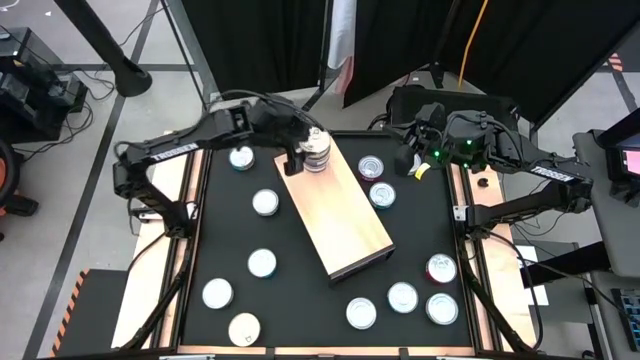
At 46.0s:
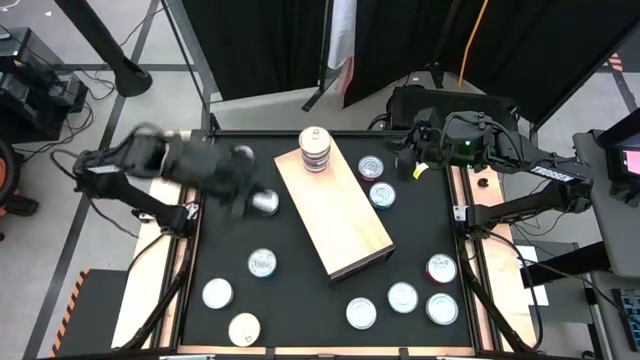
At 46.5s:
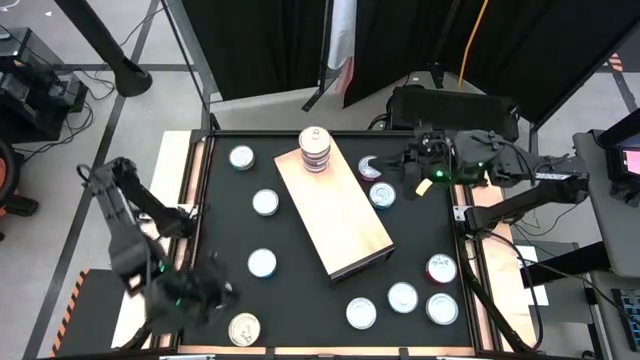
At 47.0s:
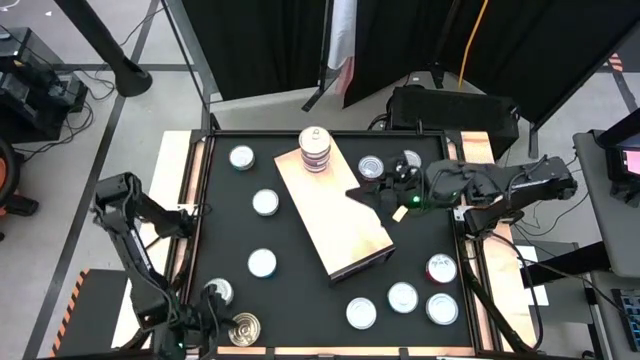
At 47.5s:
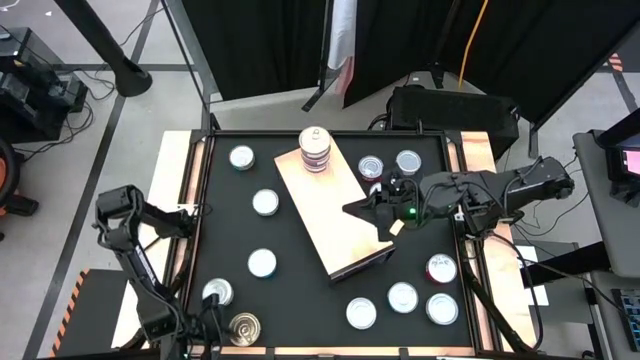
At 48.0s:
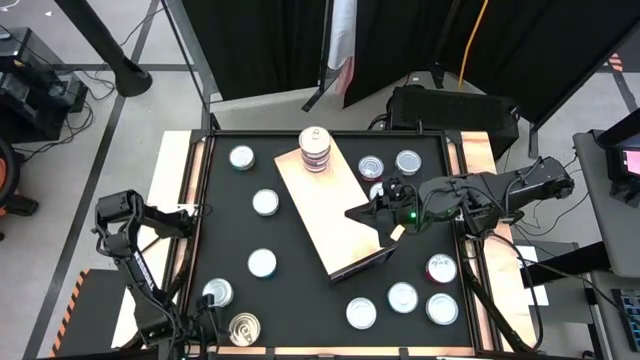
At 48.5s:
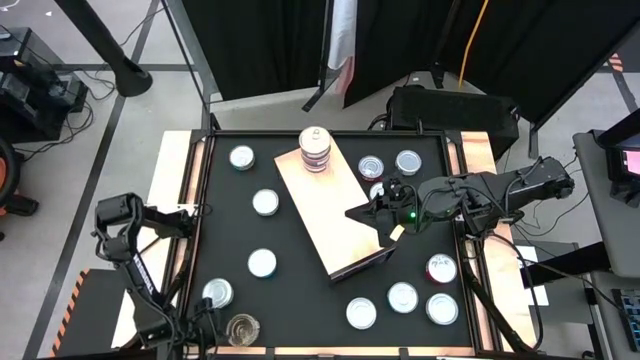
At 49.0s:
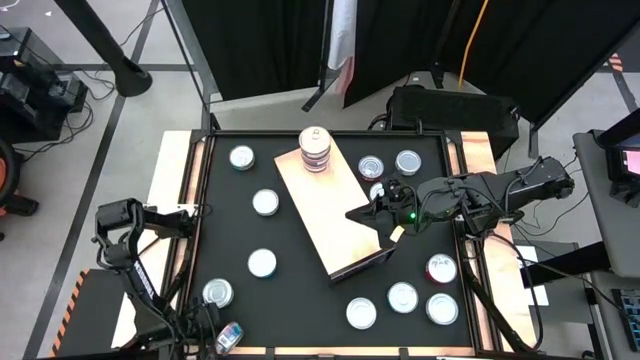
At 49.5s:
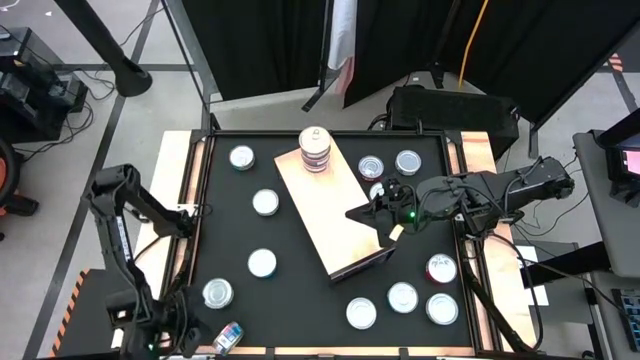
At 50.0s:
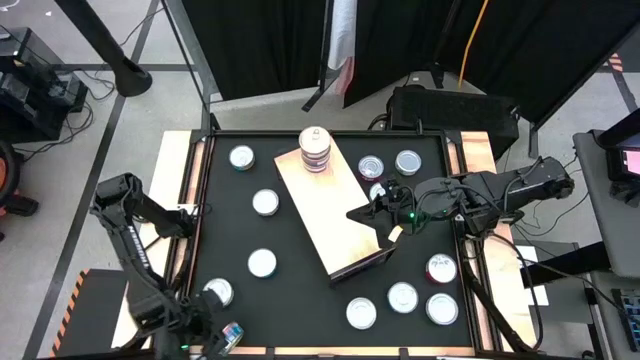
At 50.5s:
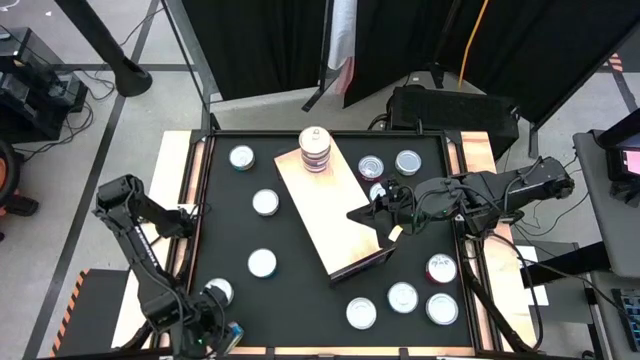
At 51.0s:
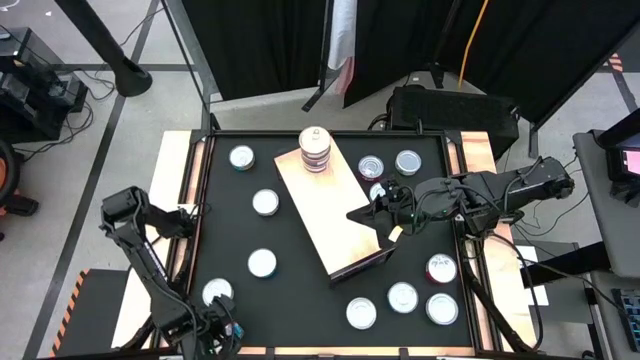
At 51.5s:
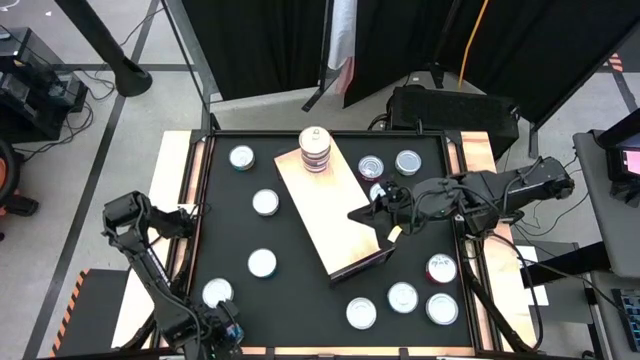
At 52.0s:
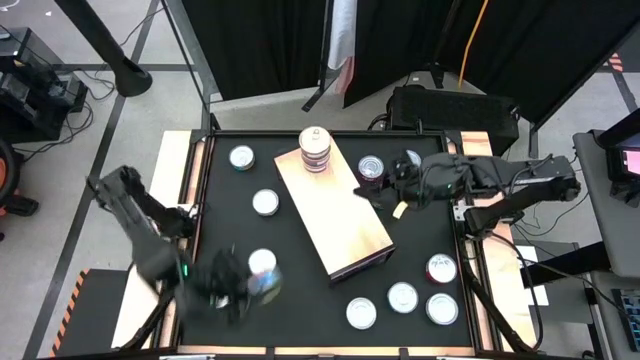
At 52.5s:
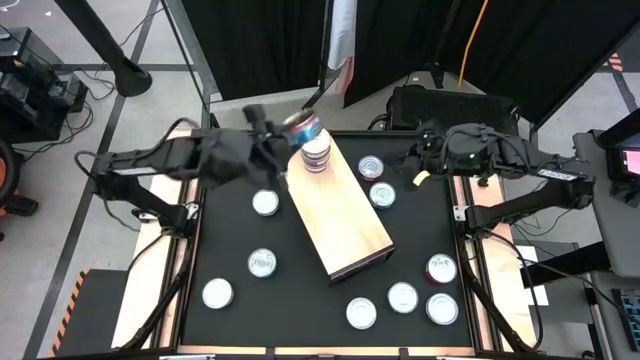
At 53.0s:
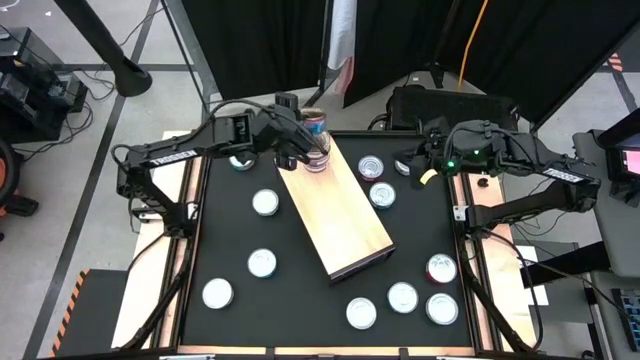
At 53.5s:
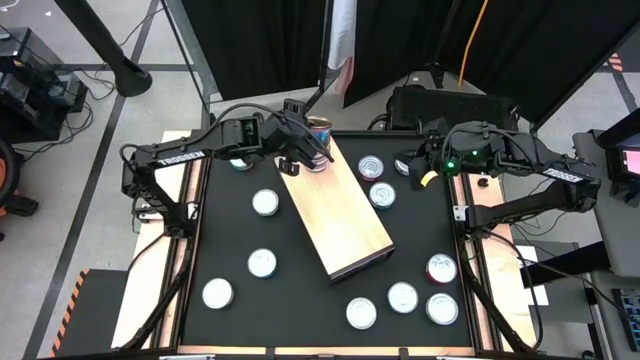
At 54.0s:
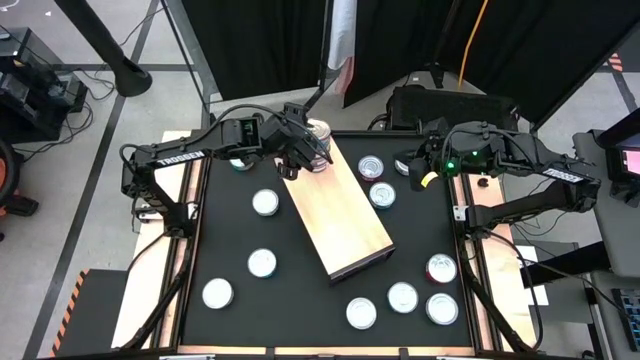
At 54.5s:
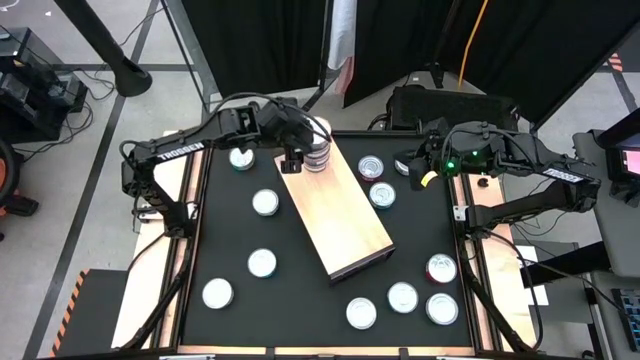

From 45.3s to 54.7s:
Task: Stack canned seafood by type on shelf
Stack the blue-pink tuna can on top of the stacked blue-pink tuna can on the shelf

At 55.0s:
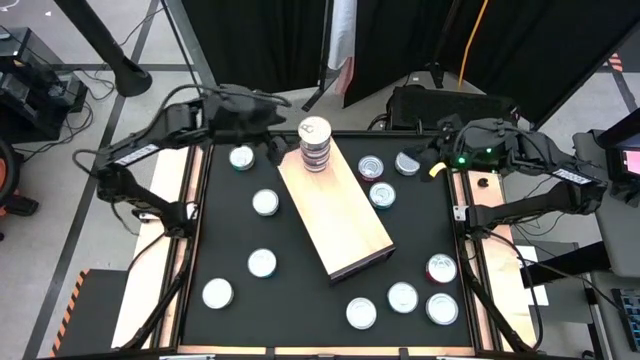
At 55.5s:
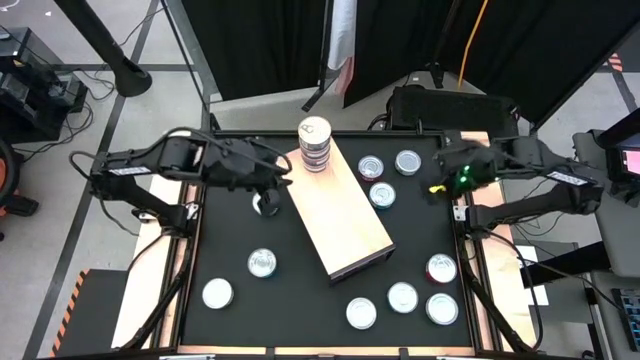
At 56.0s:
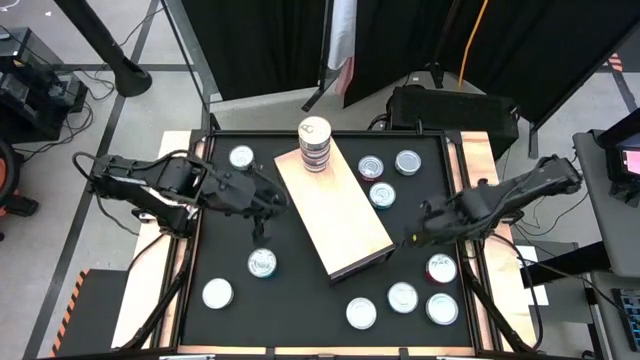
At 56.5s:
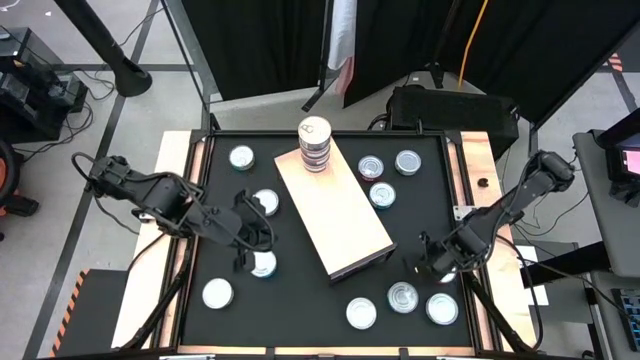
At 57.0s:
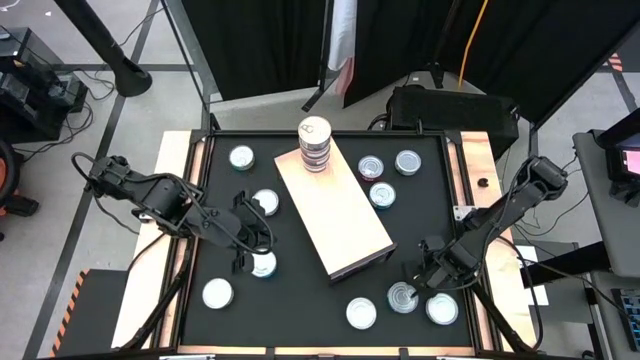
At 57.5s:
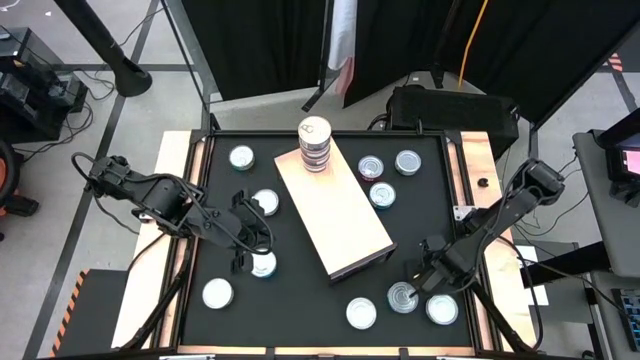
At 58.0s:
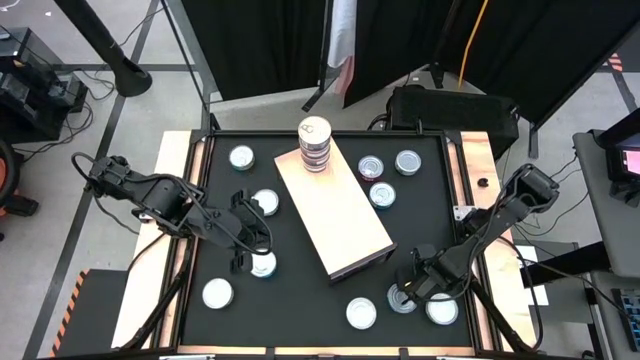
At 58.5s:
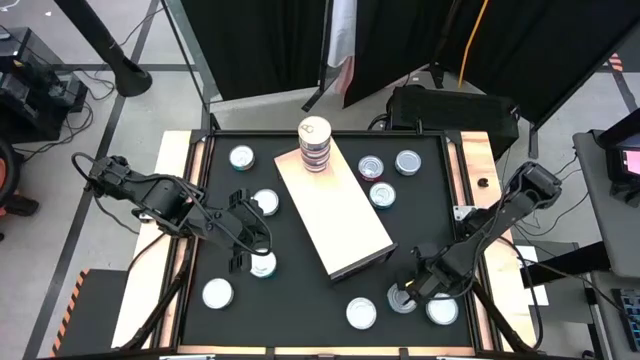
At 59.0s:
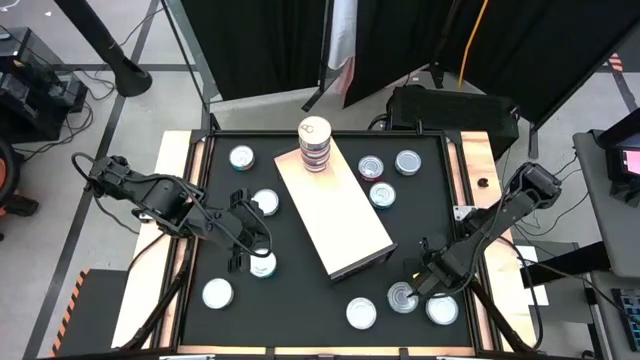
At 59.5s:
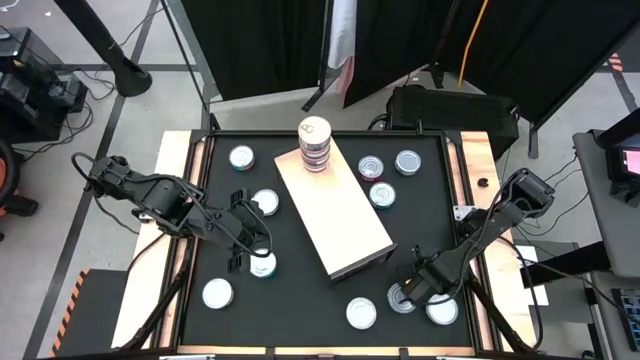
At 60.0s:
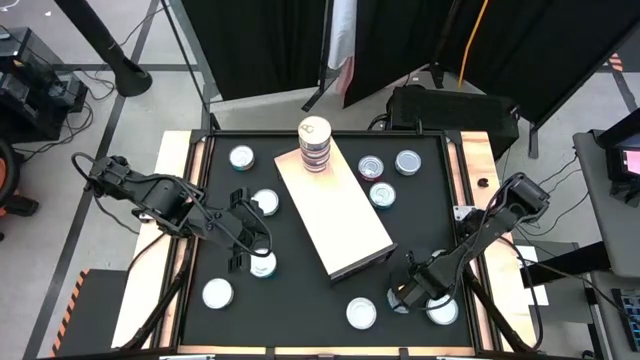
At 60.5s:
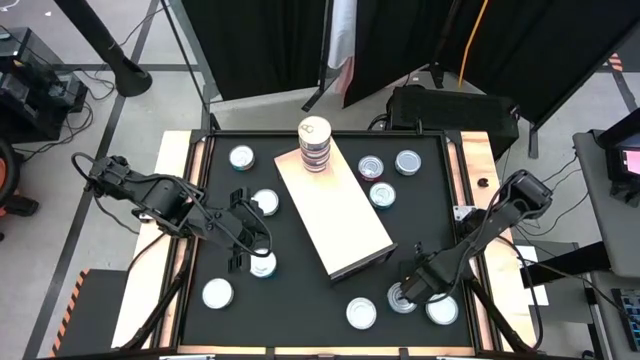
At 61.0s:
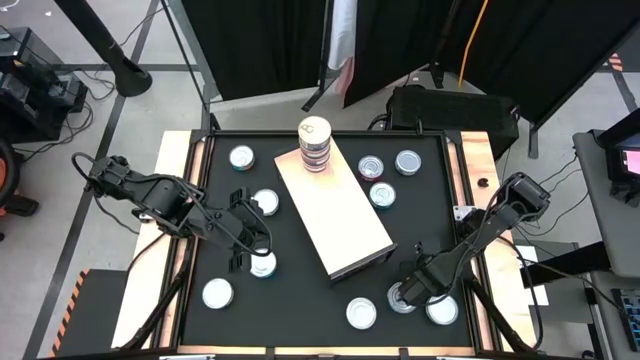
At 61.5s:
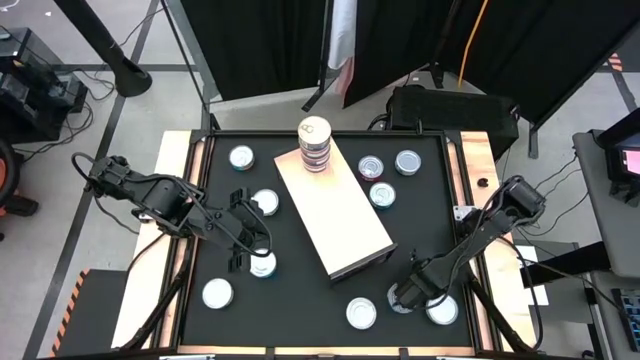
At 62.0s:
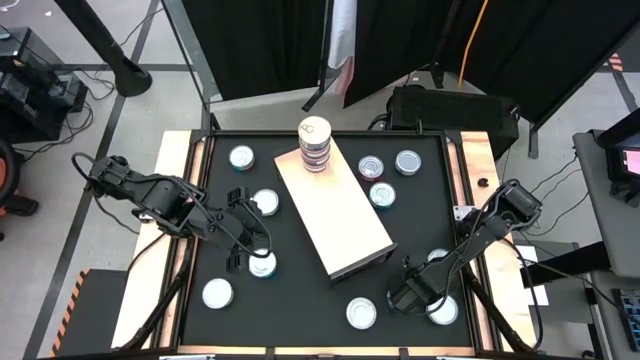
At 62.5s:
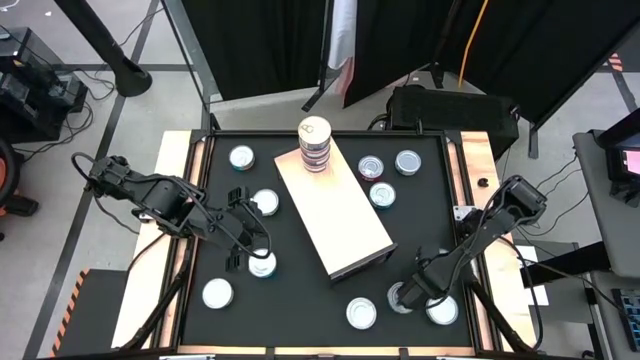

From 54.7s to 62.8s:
Put the red tuna can on the shelf

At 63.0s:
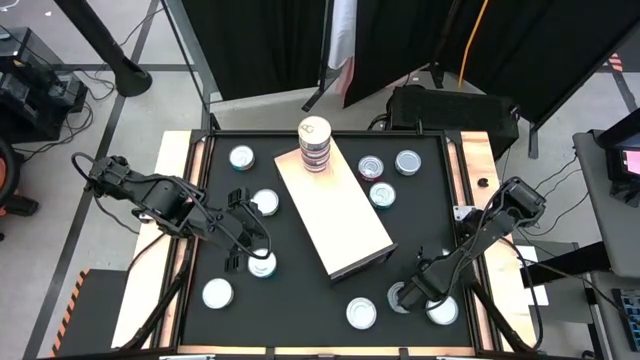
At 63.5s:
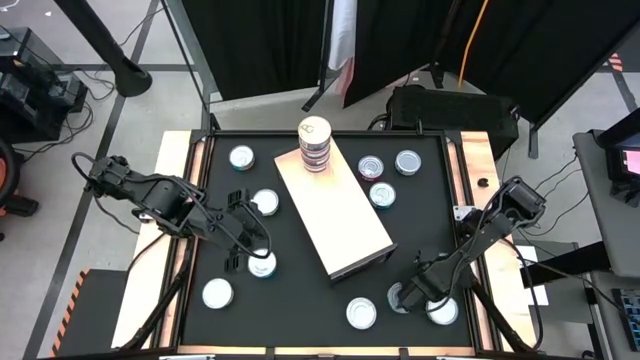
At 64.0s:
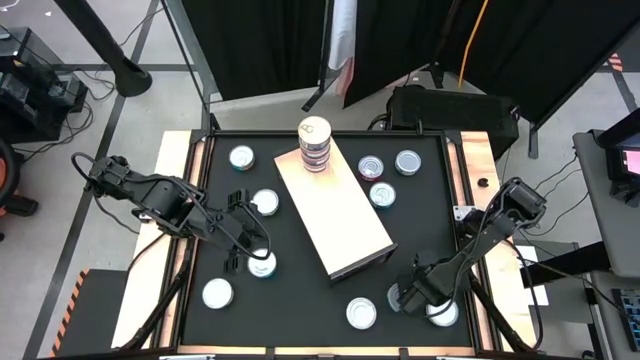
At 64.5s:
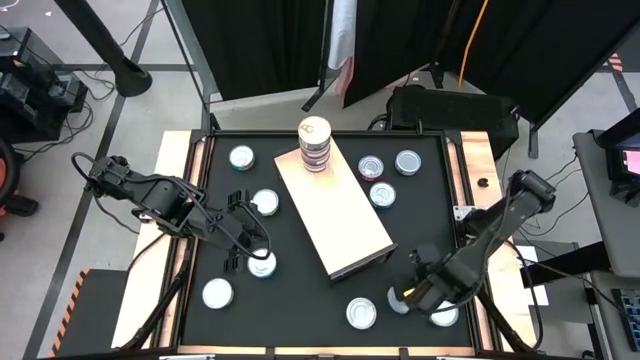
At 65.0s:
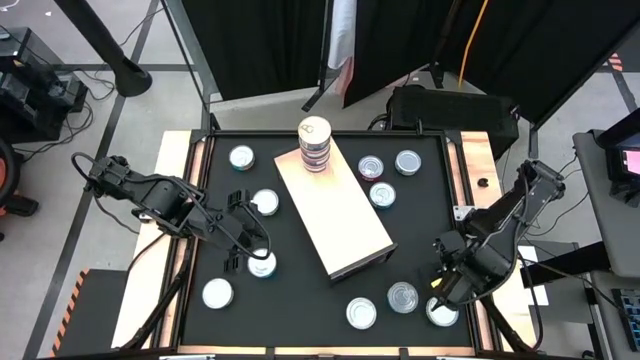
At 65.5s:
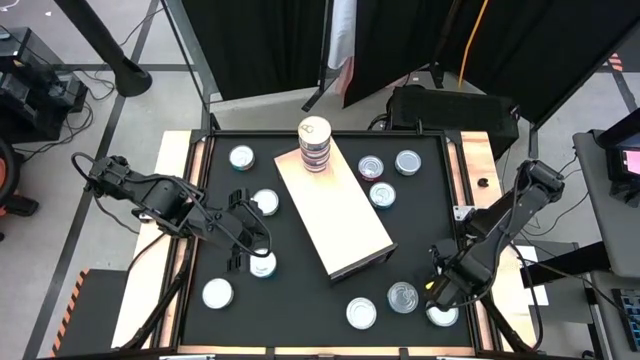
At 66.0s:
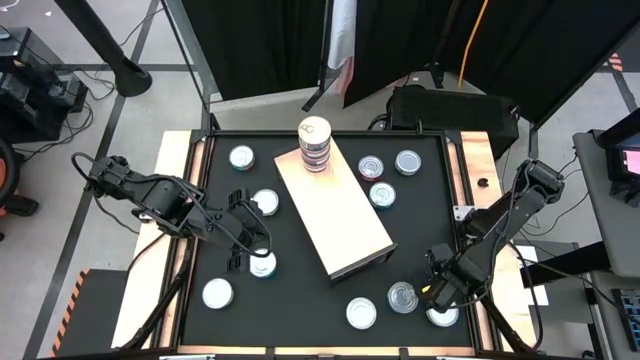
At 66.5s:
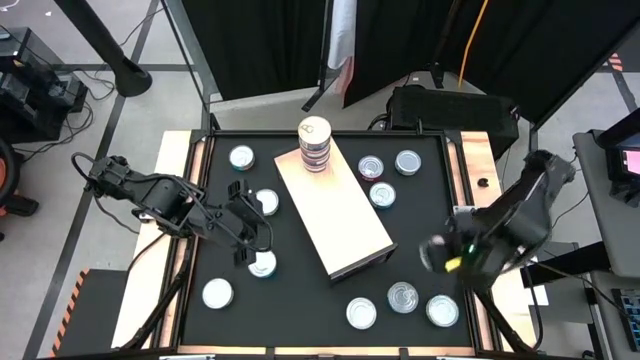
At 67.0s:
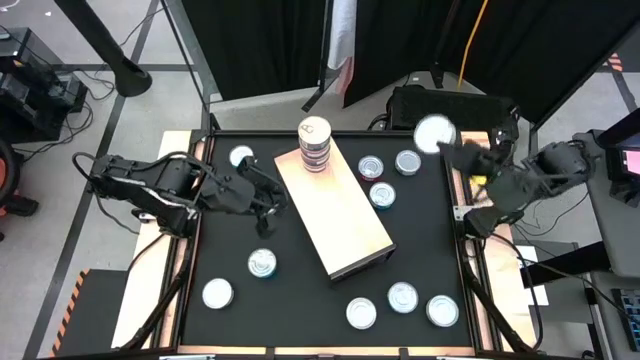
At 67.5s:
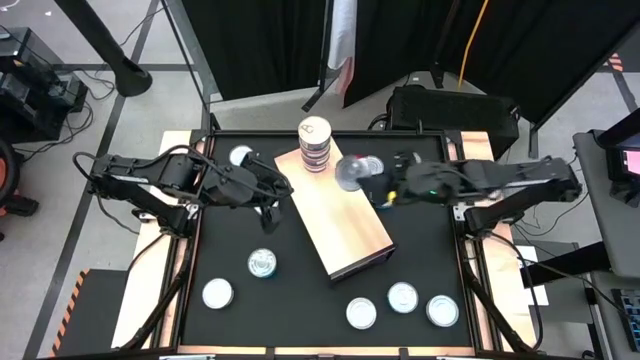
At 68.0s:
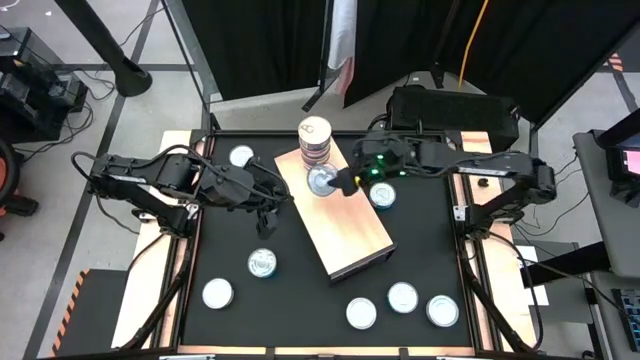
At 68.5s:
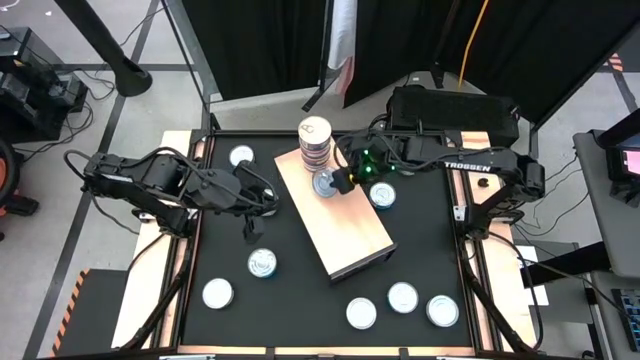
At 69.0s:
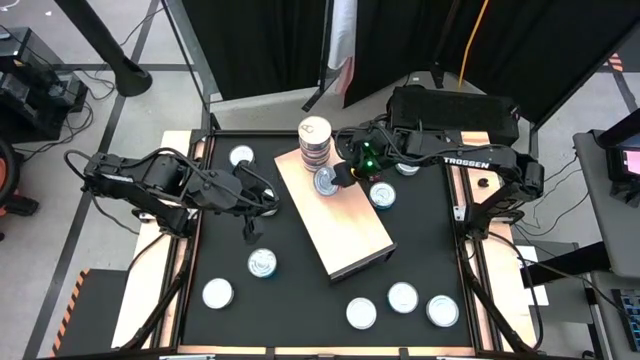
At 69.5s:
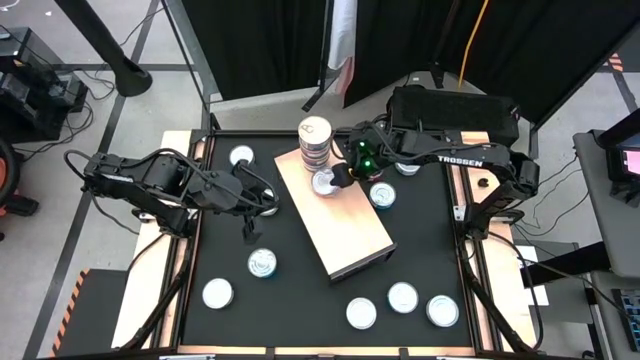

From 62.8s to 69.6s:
Put the red tuna can on the shelf
